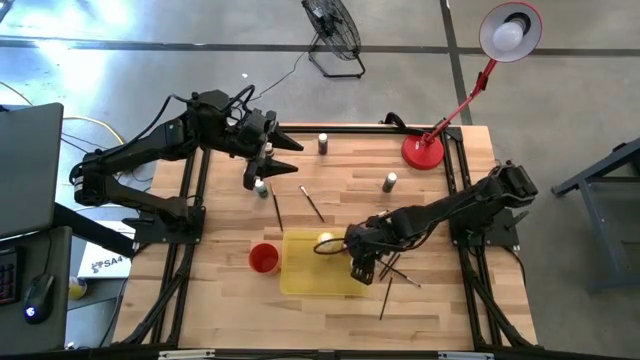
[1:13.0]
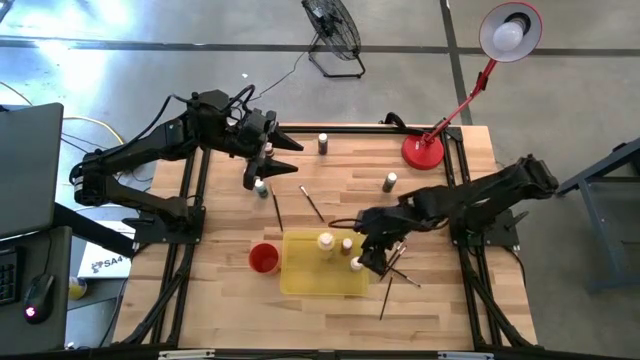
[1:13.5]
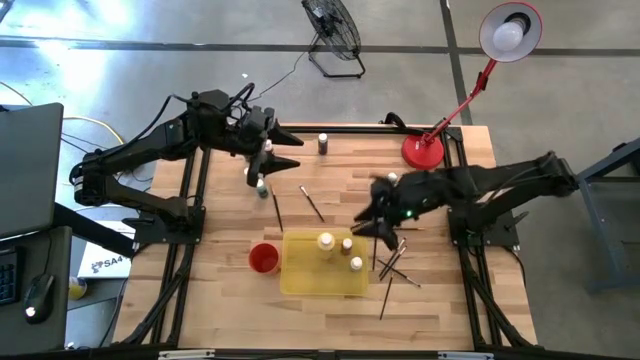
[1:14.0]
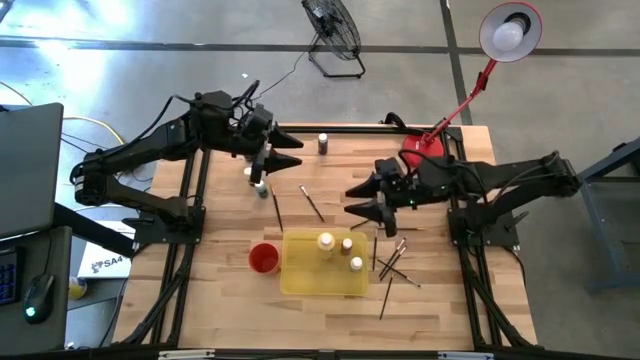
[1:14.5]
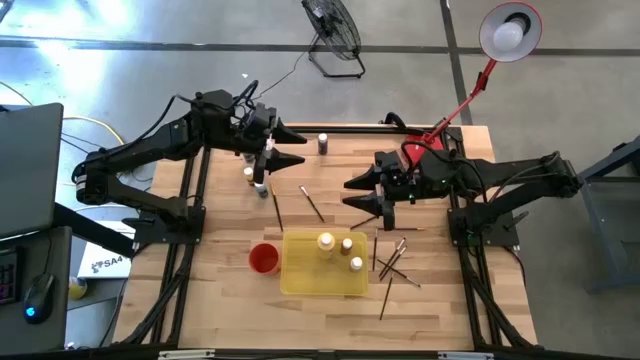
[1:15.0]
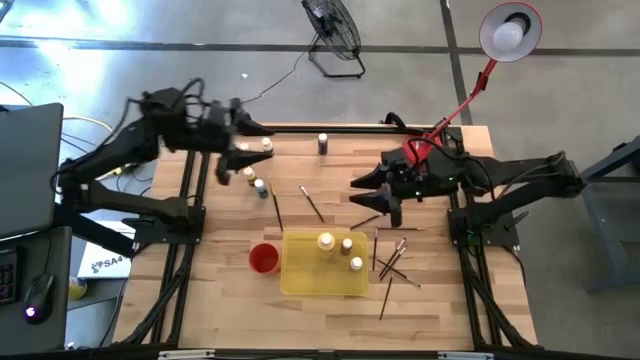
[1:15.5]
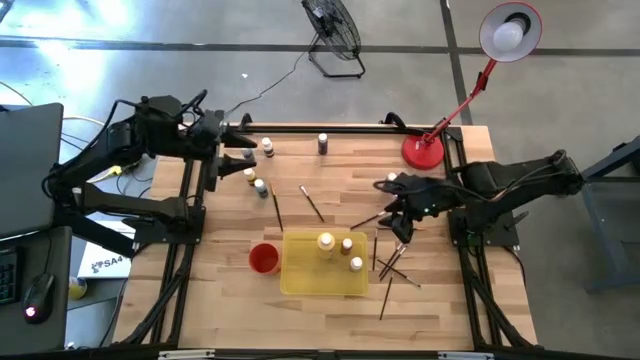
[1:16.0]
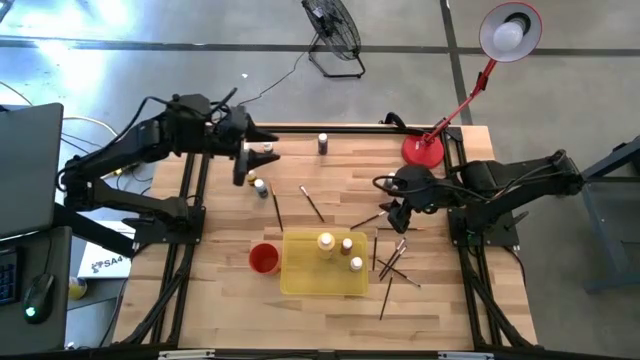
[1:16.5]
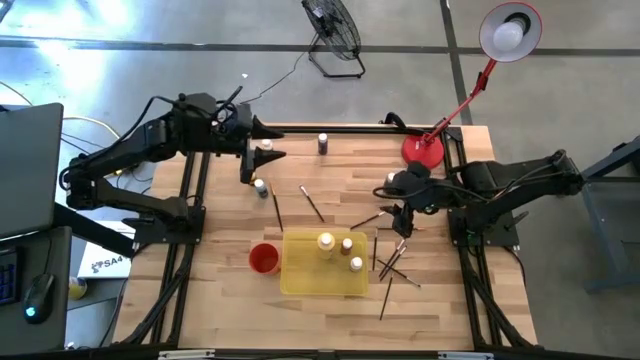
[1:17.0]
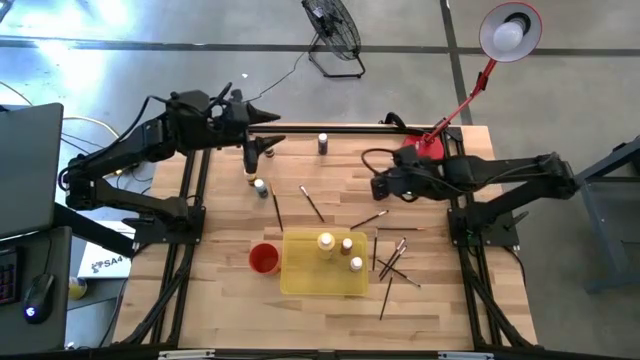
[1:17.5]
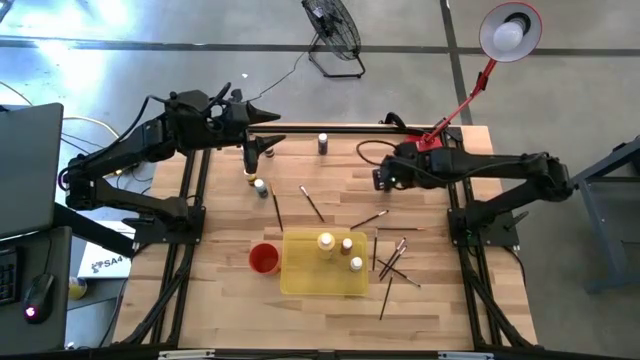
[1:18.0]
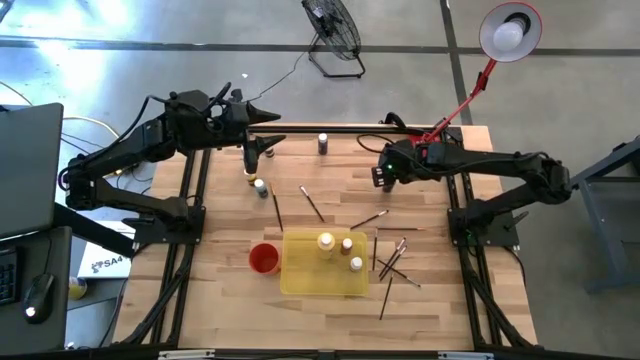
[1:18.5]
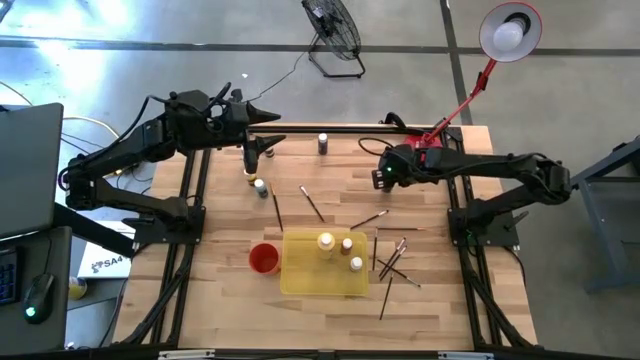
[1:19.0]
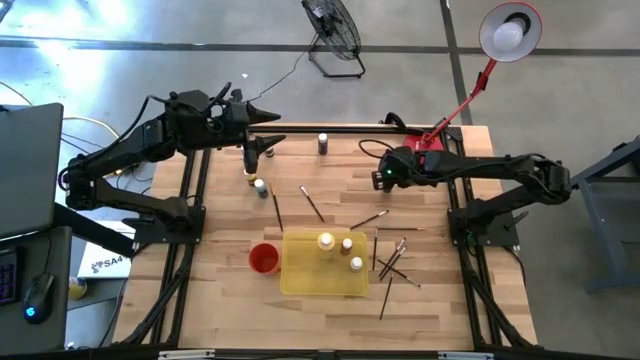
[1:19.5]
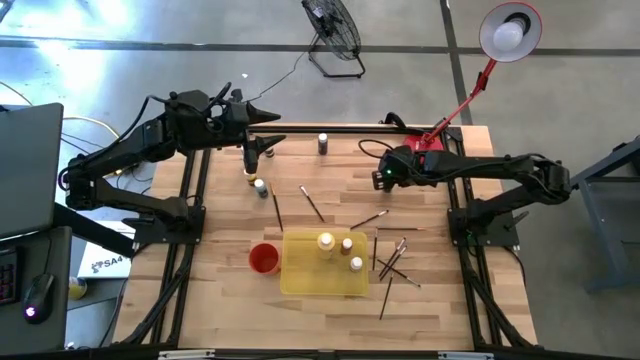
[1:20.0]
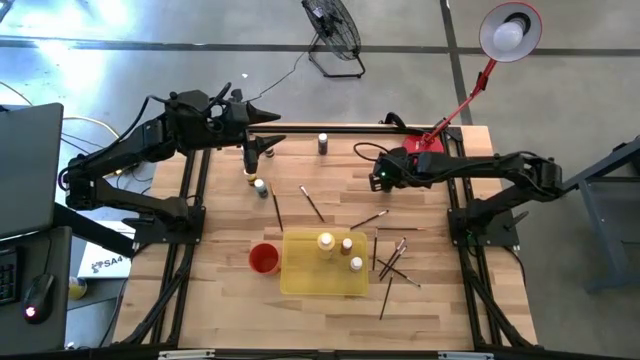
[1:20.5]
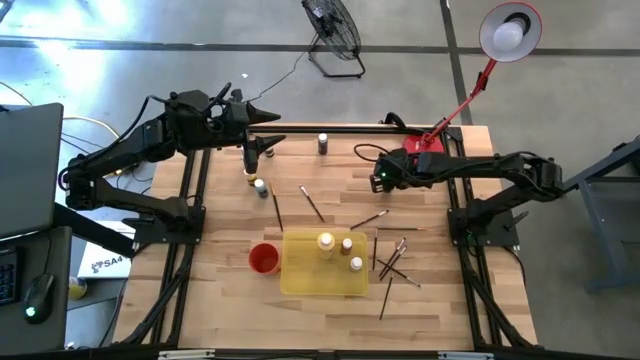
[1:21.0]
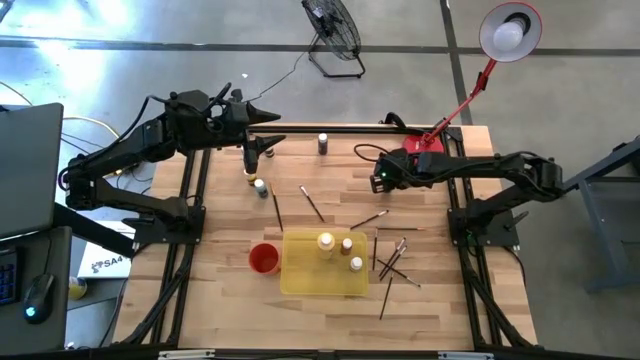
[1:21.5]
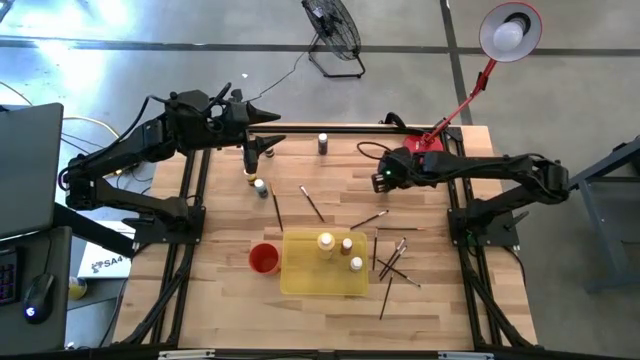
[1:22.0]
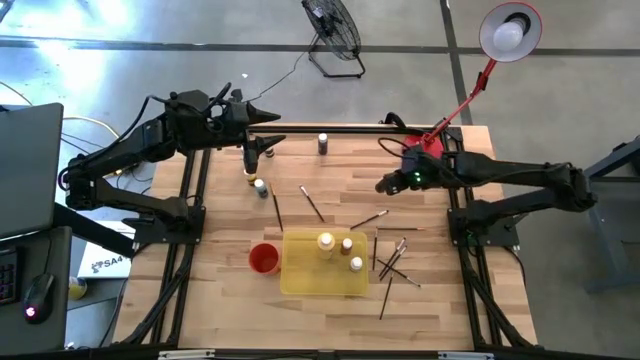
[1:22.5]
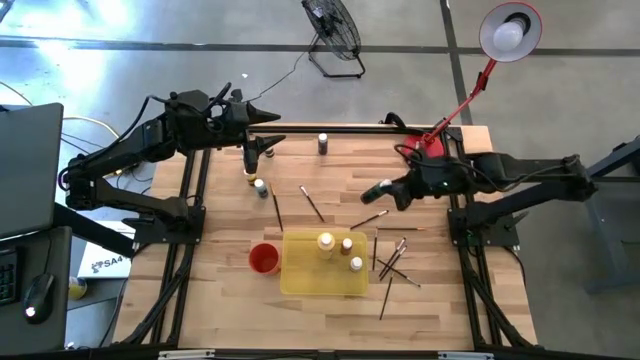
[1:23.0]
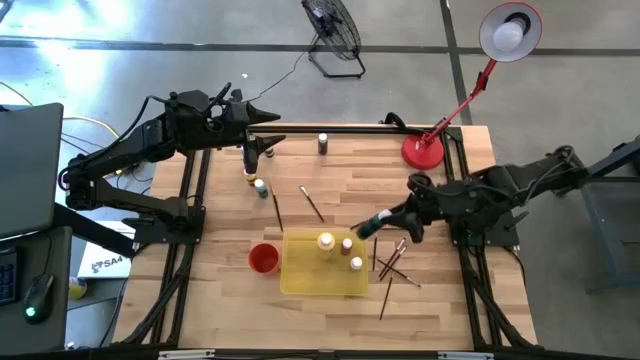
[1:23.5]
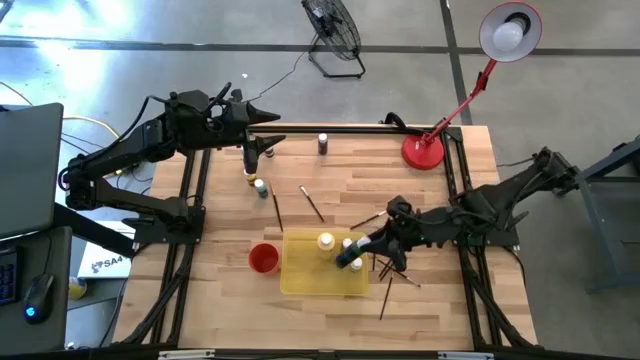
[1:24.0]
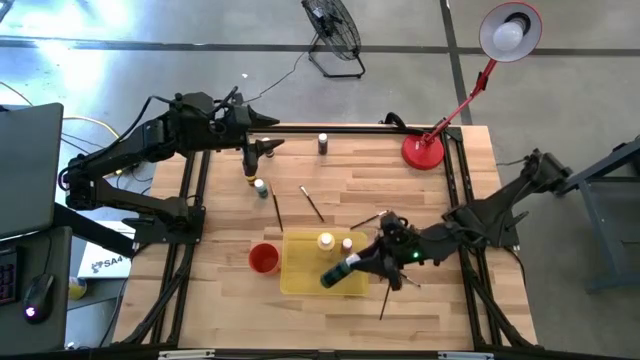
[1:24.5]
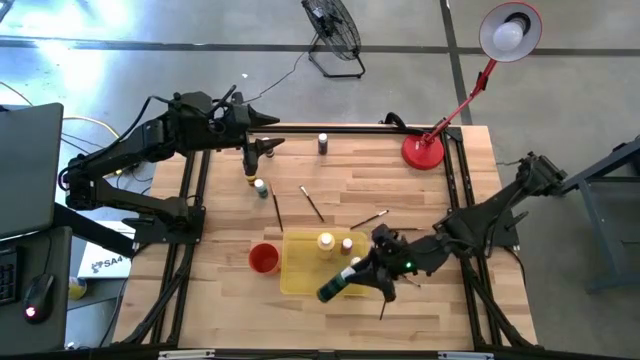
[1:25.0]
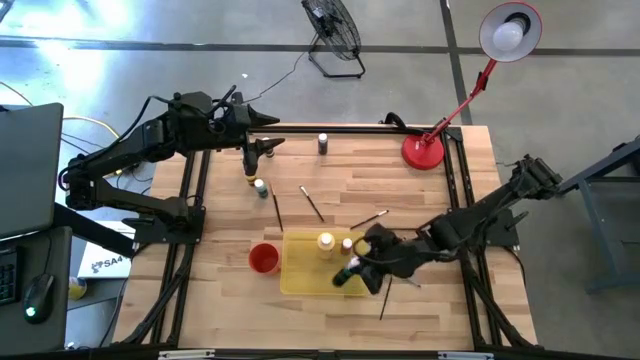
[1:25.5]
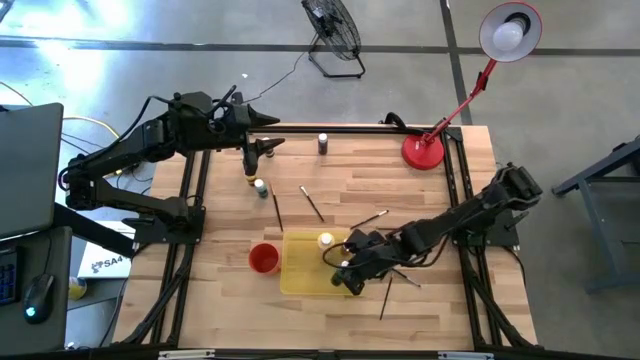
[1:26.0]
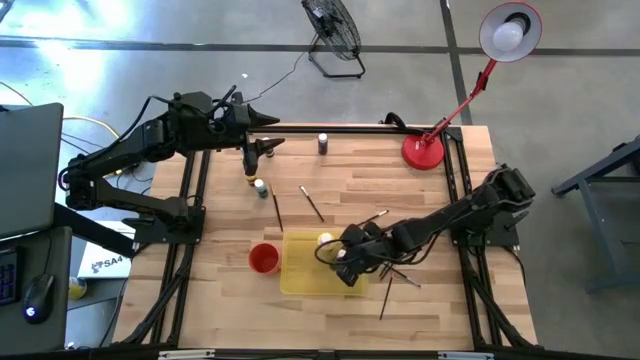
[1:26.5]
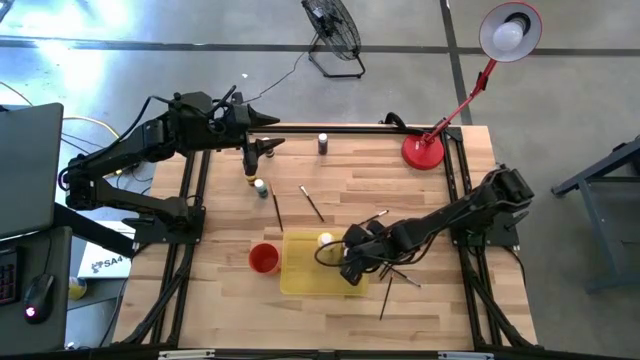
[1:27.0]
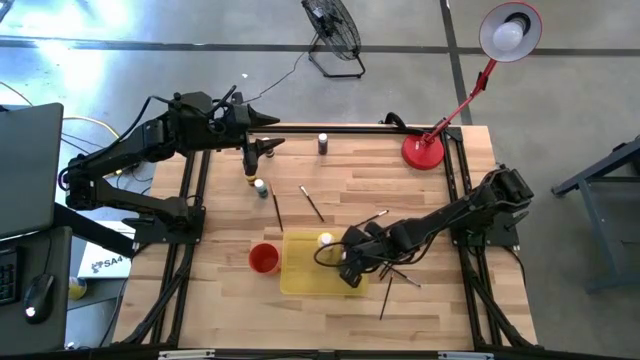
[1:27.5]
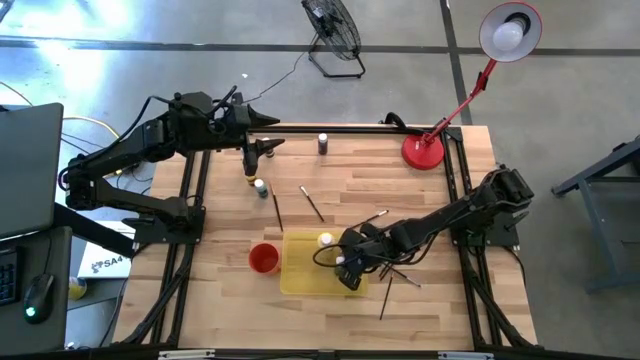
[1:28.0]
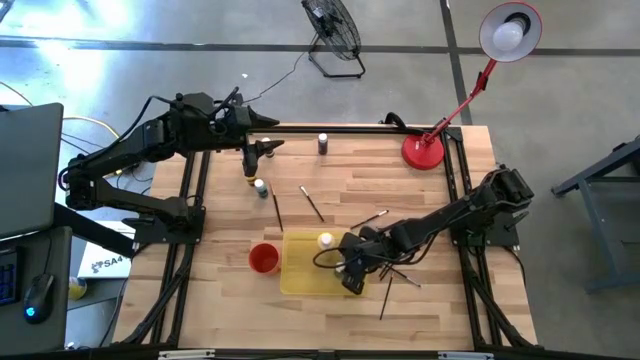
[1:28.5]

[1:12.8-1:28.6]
Task: Pick & Place Paint Supplies
Put the green paint bottle into the yellow bin
